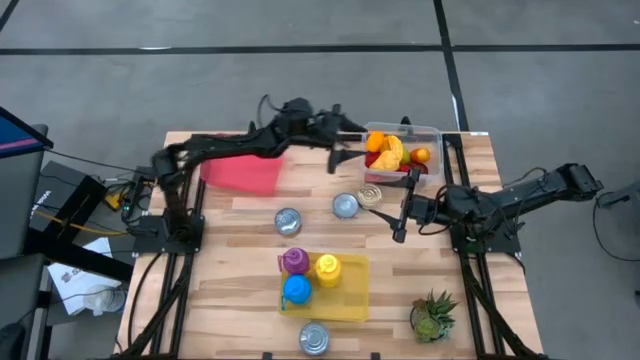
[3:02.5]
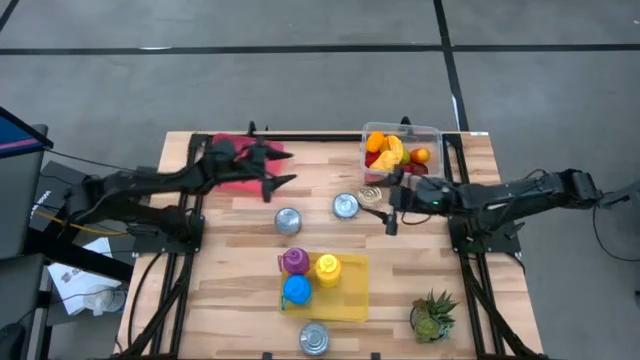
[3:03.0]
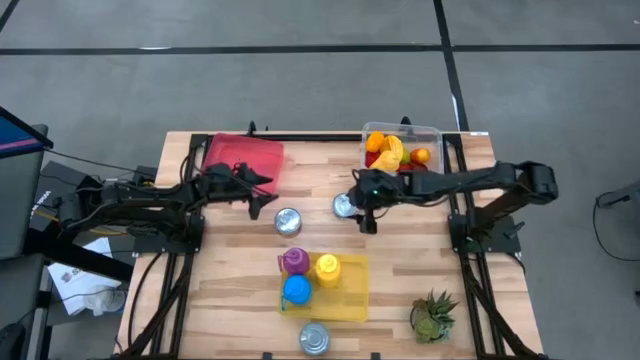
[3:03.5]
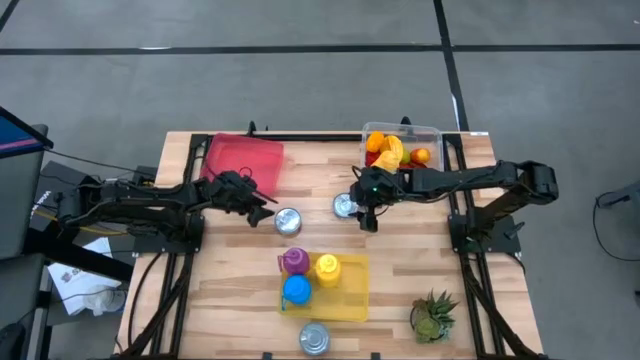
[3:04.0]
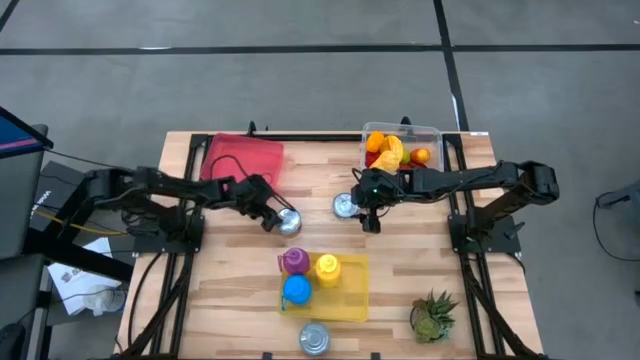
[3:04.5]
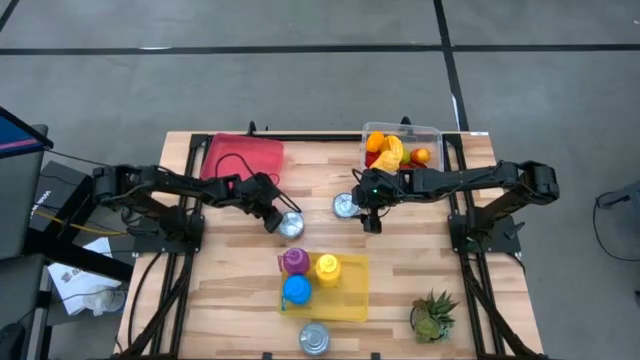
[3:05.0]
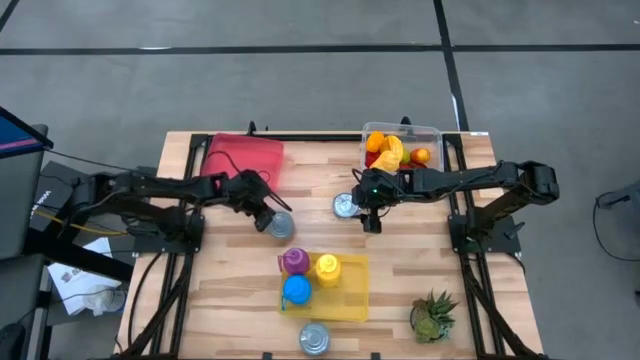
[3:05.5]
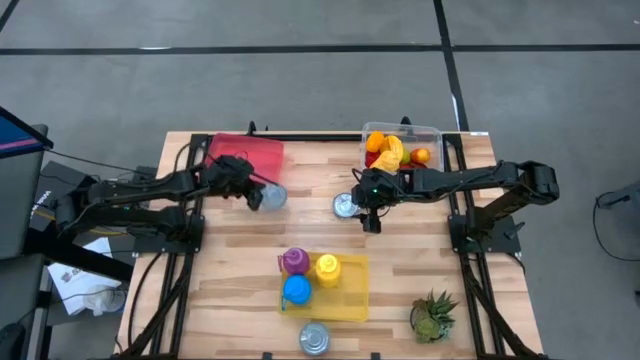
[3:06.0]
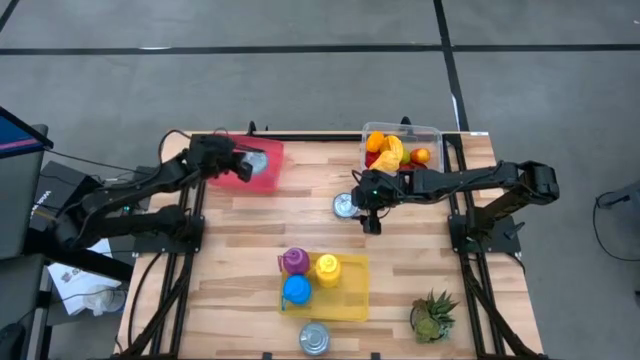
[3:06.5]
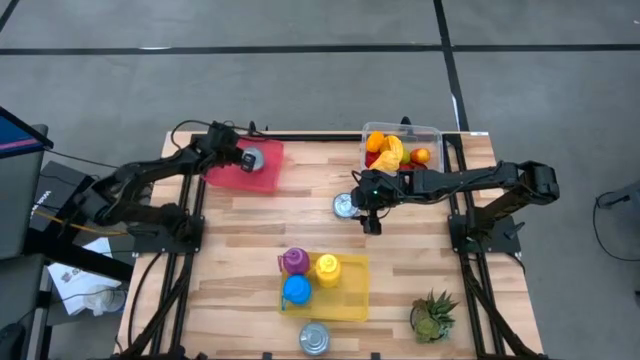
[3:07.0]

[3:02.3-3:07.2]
Task: Pick & Place Food Item
Put the red tuna can into the red bin

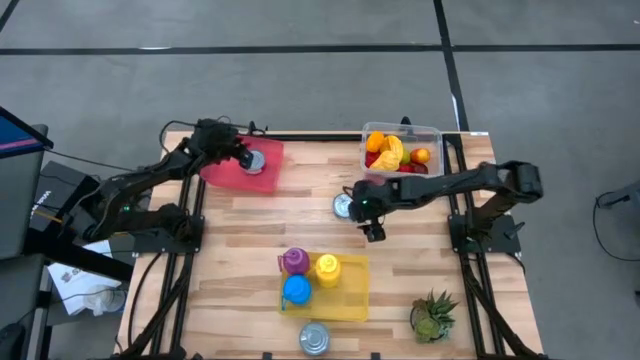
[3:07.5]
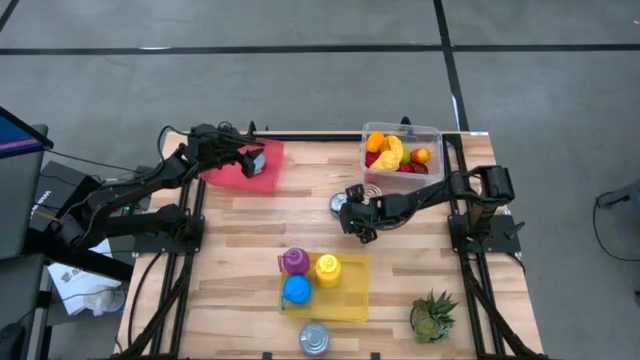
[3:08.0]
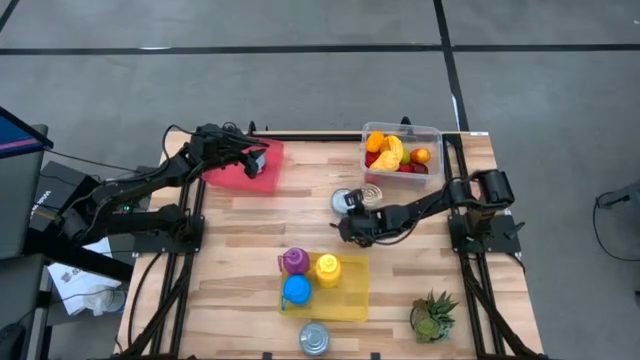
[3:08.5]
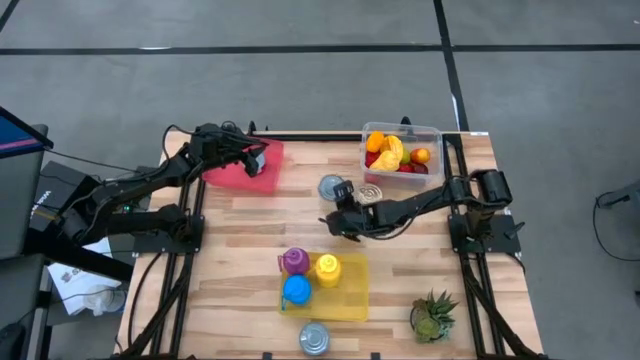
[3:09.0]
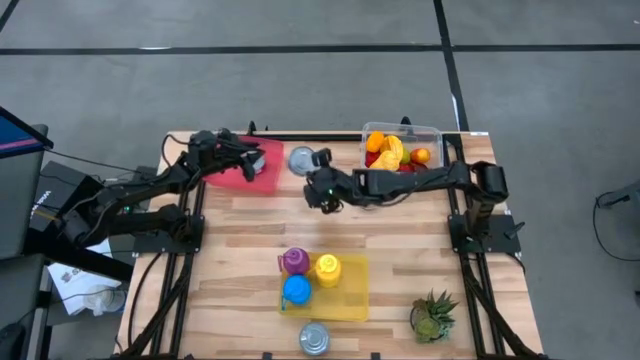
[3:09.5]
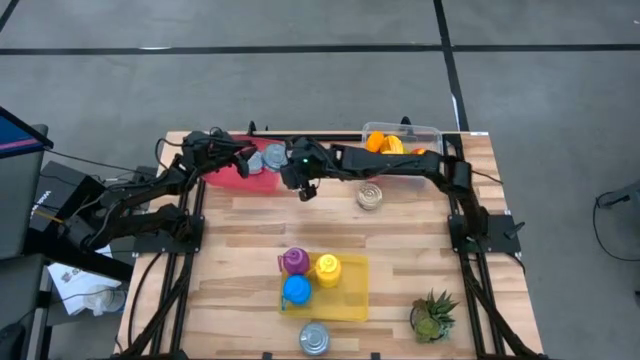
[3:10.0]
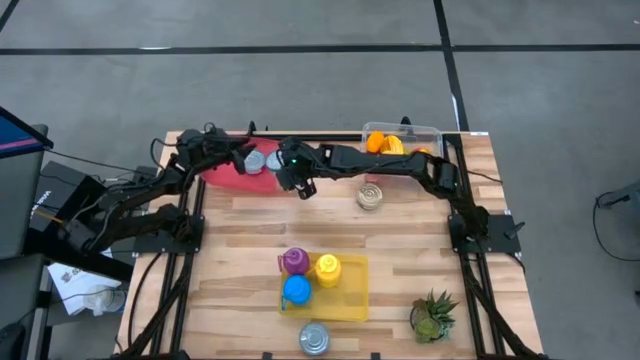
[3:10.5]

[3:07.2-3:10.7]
Put the blue tuna can into the red bin

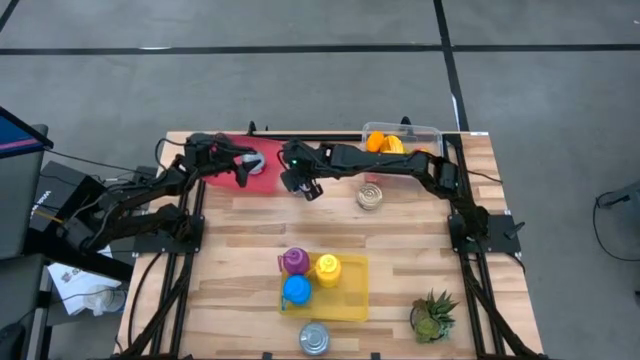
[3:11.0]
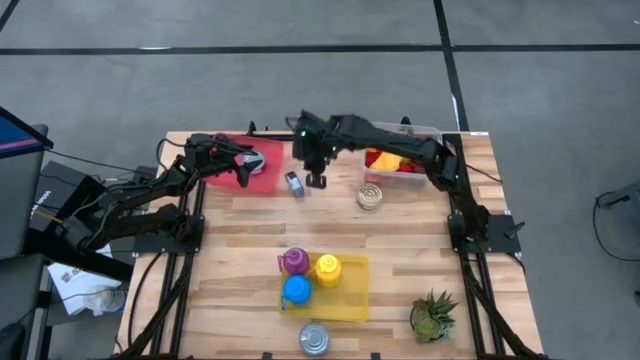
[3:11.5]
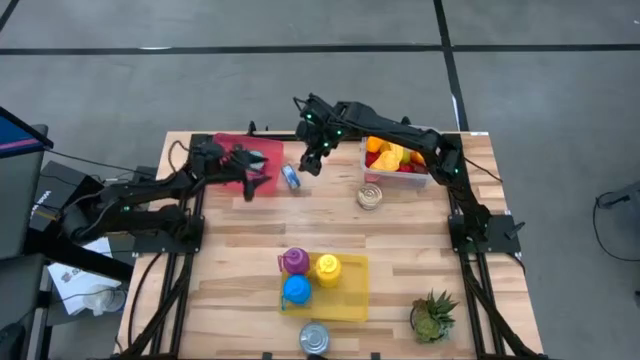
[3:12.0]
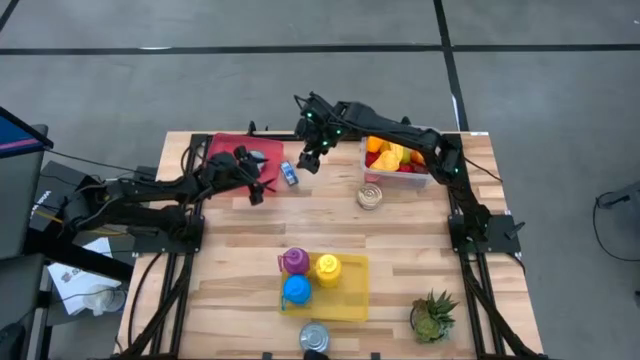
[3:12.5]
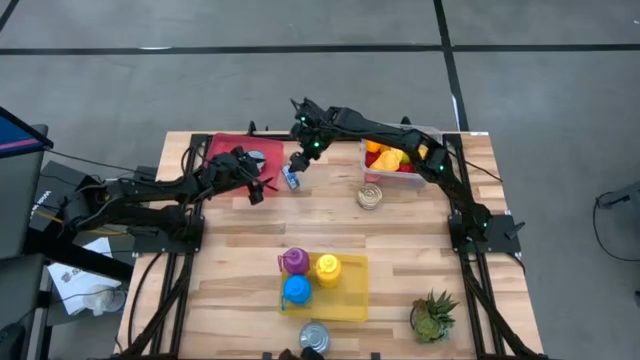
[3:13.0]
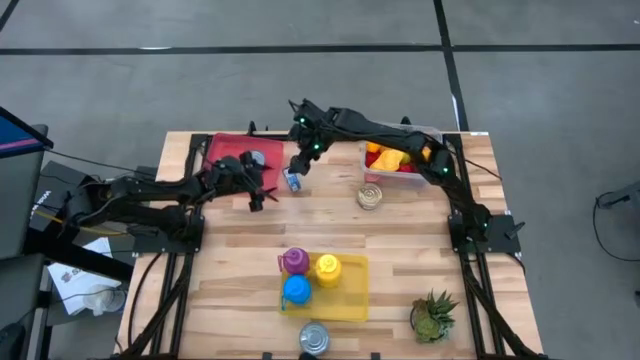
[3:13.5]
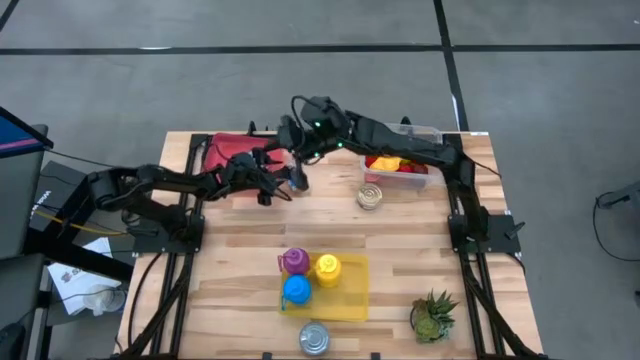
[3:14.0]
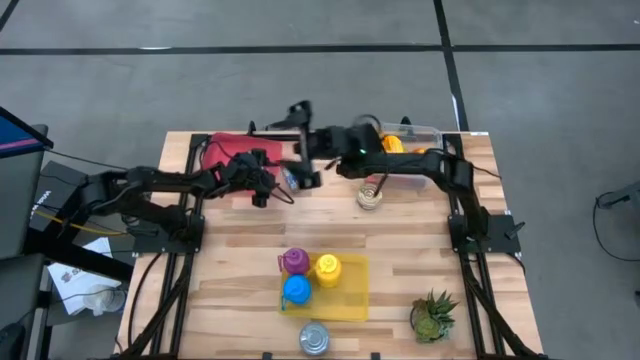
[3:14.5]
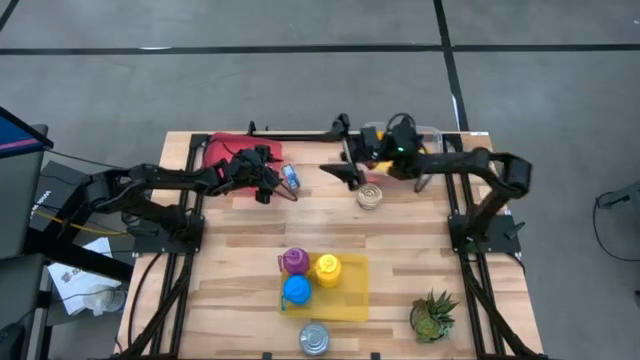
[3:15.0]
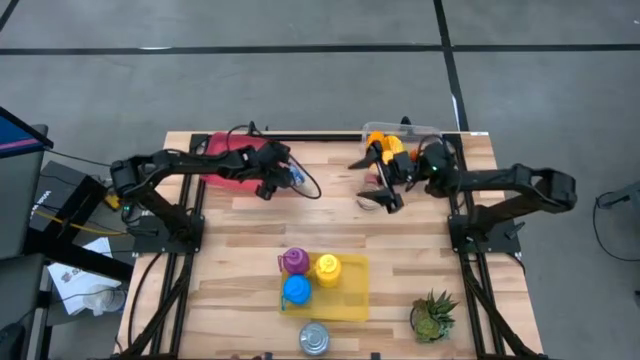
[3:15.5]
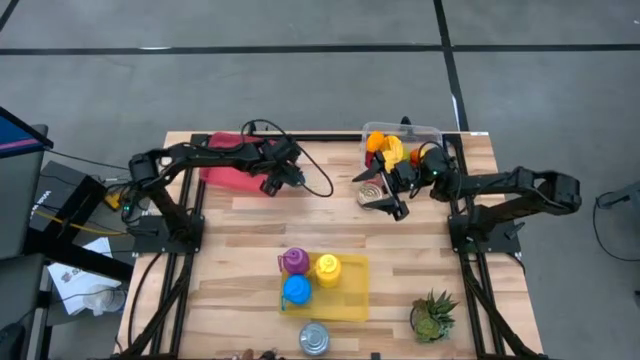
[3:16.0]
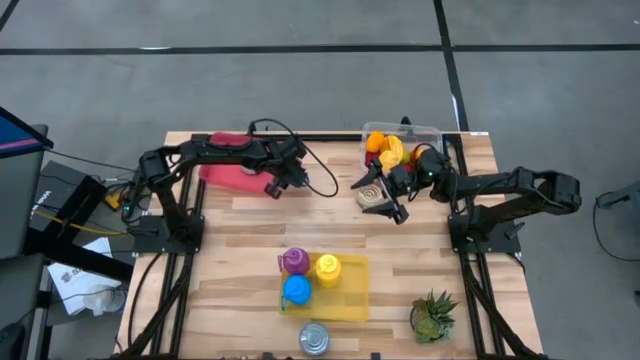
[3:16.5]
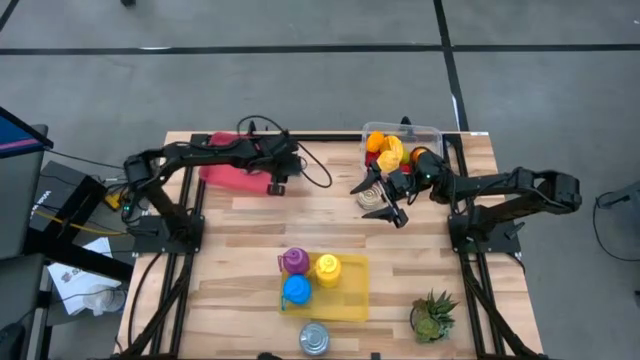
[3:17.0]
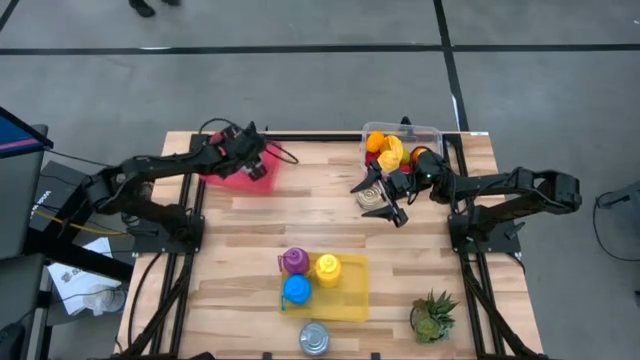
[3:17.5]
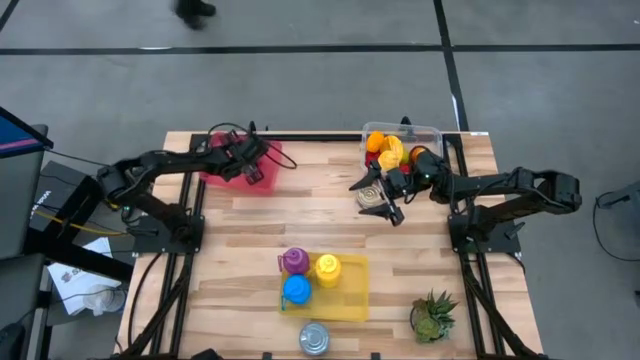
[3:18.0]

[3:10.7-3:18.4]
Put the blue tuna can into the red bin

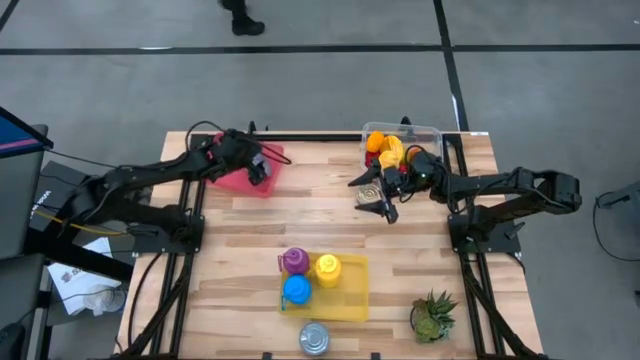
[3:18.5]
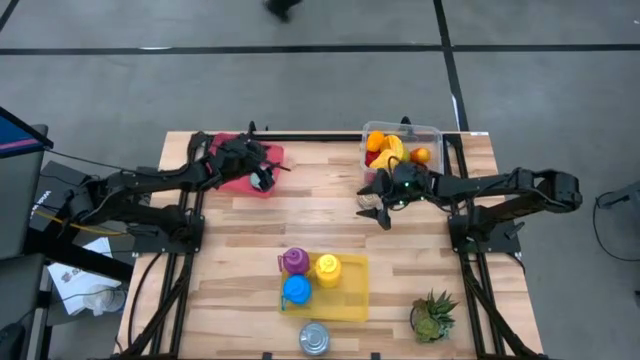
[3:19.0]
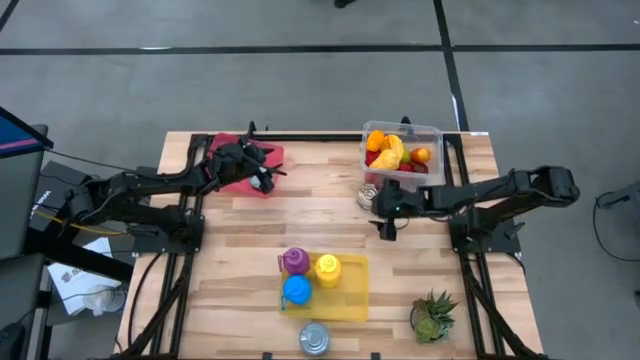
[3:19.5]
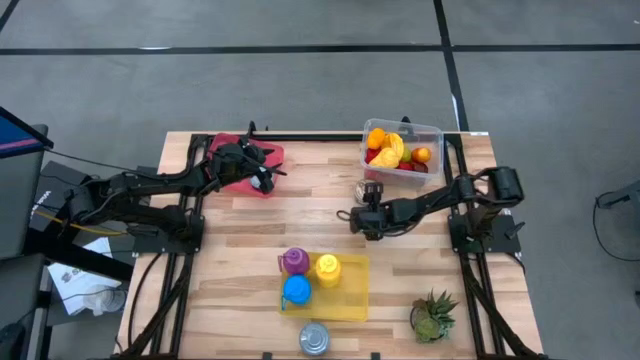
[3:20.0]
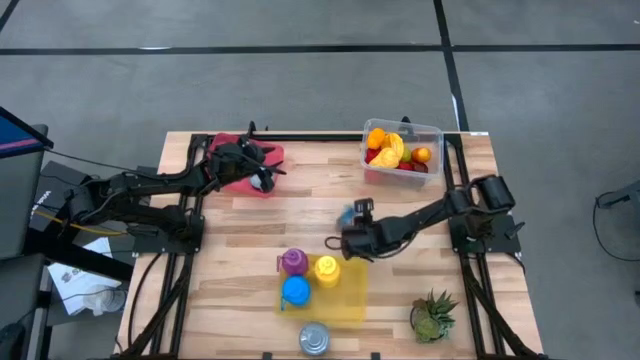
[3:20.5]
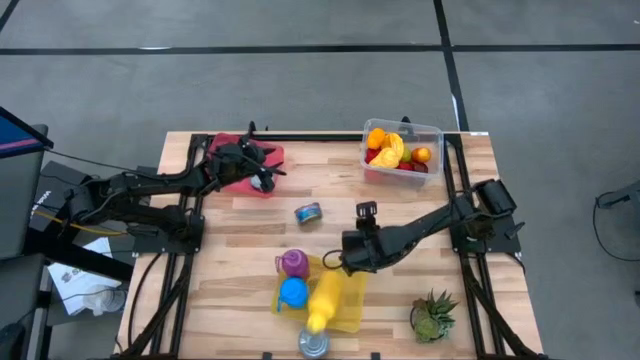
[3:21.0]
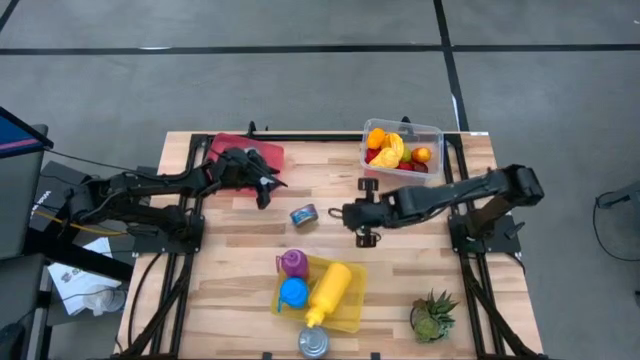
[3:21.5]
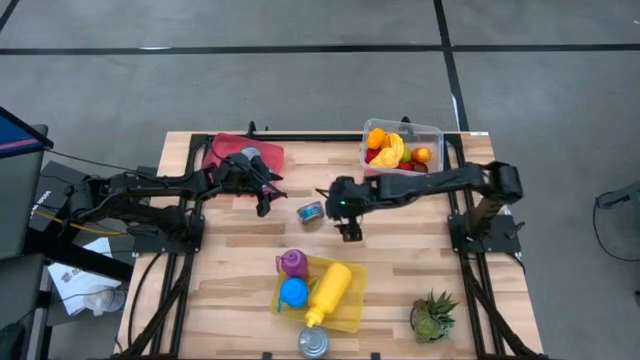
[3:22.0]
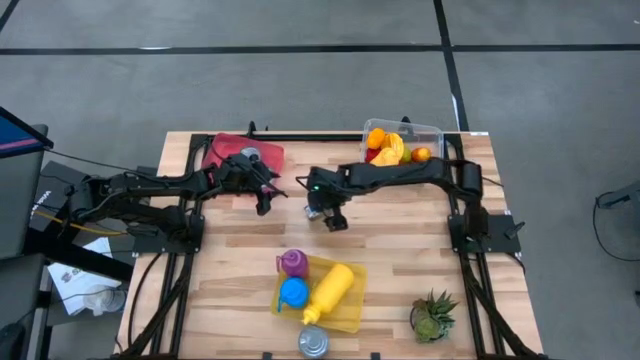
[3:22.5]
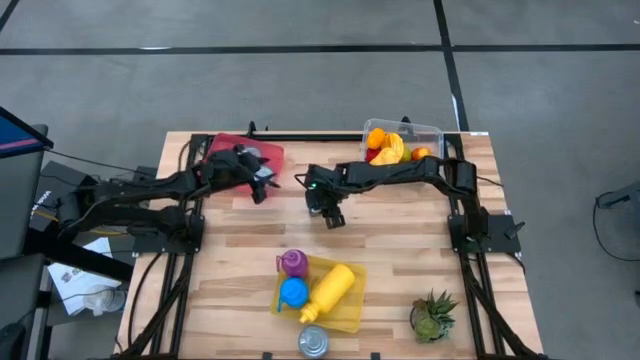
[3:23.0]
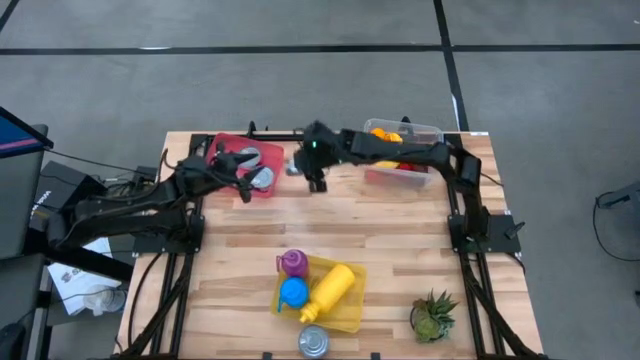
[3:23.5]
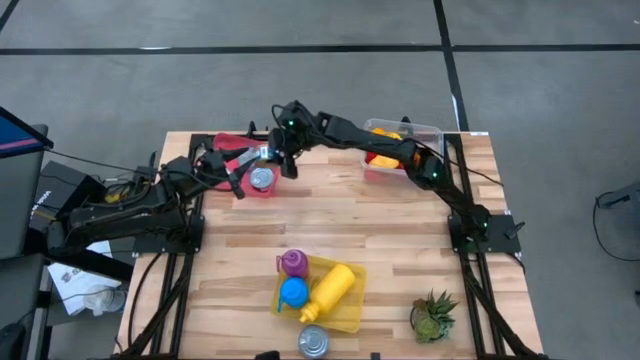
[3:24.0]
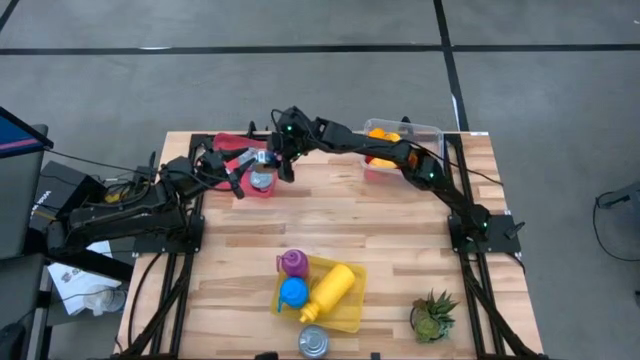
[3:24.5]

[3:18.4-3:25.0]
Put the blue pink tuna can into the red bin
